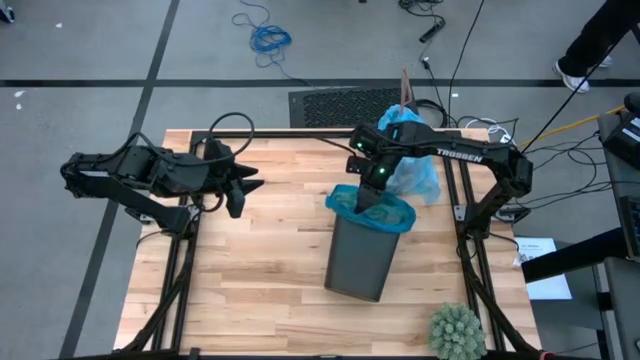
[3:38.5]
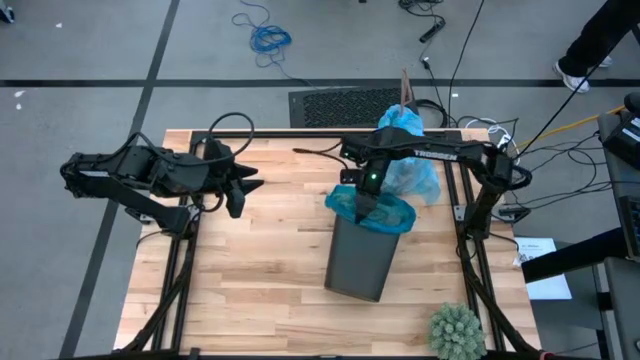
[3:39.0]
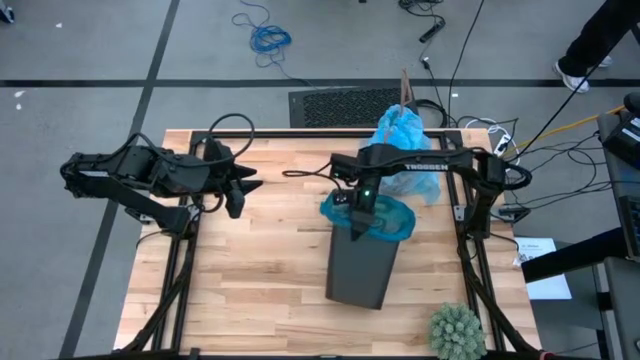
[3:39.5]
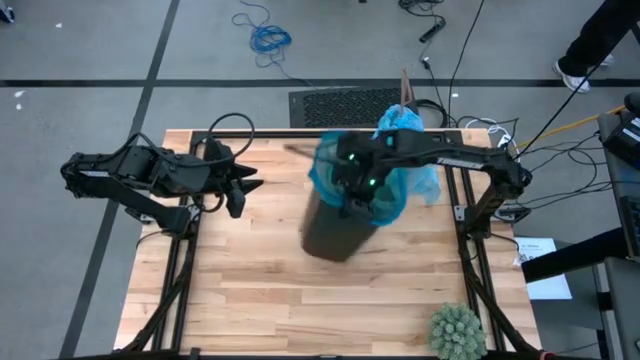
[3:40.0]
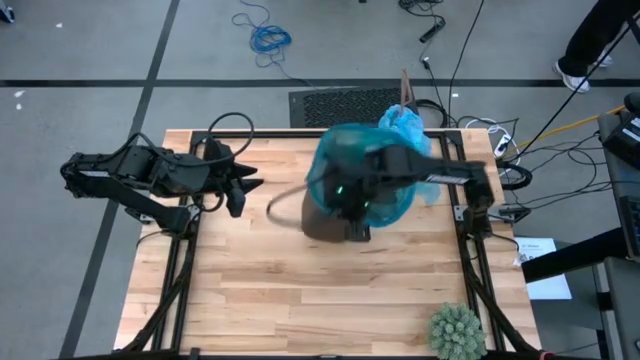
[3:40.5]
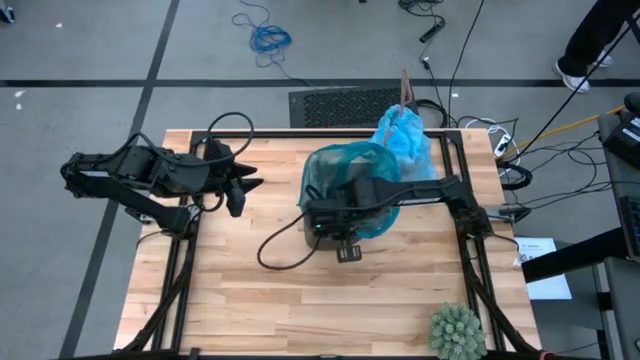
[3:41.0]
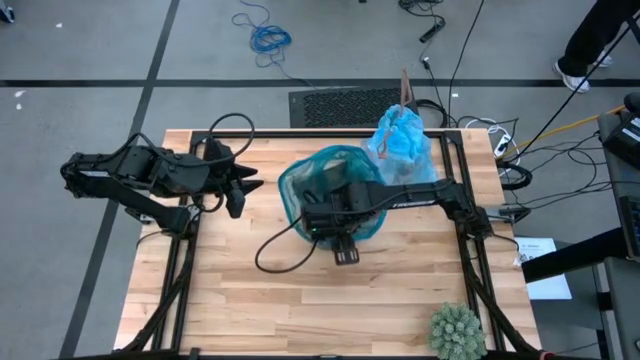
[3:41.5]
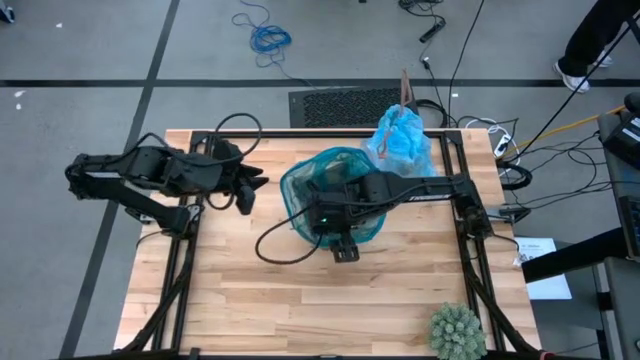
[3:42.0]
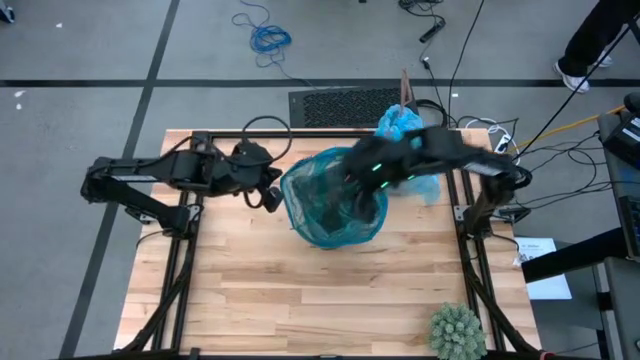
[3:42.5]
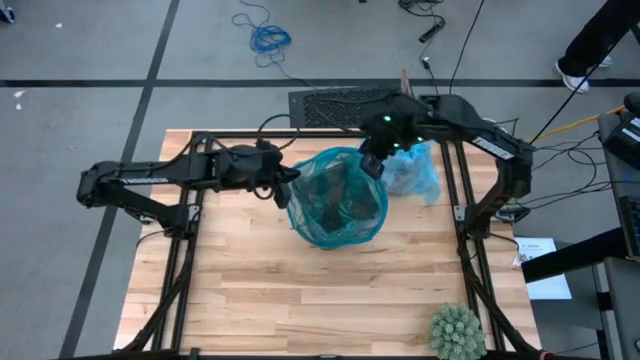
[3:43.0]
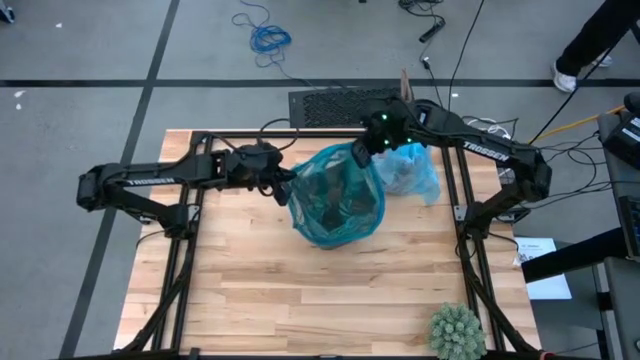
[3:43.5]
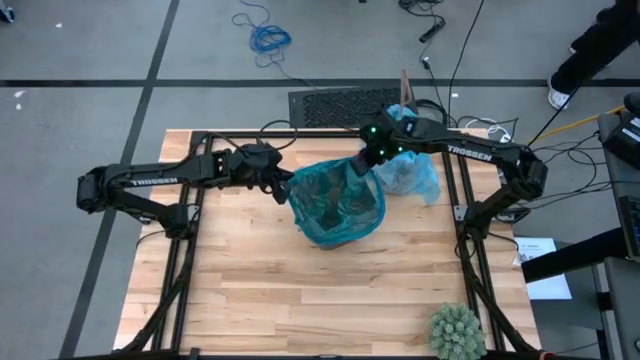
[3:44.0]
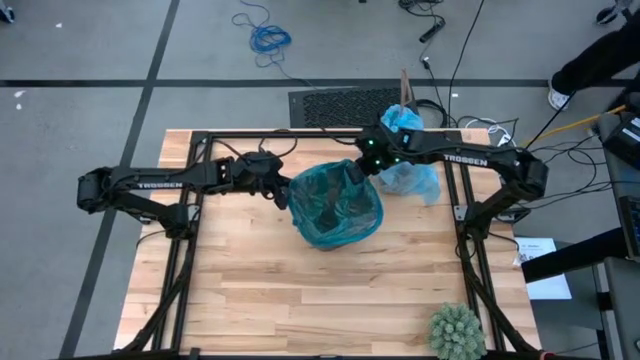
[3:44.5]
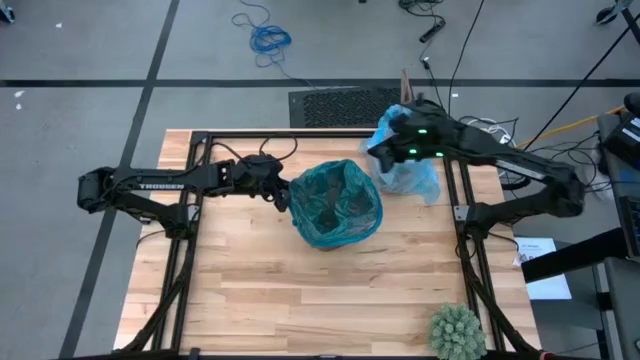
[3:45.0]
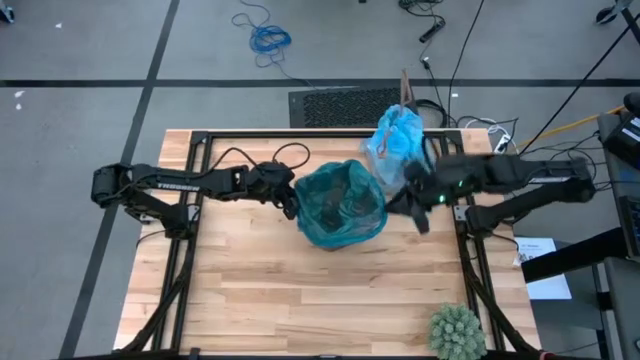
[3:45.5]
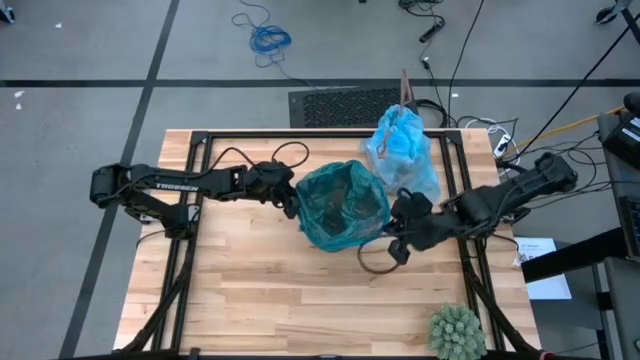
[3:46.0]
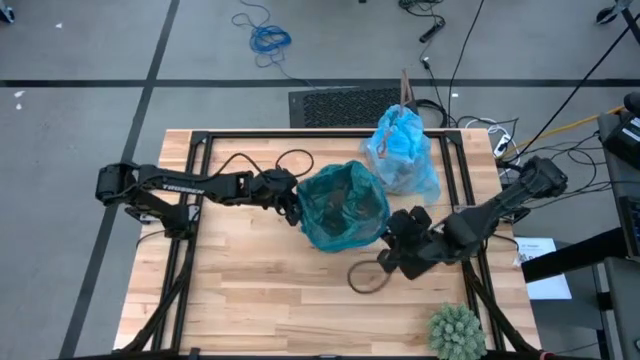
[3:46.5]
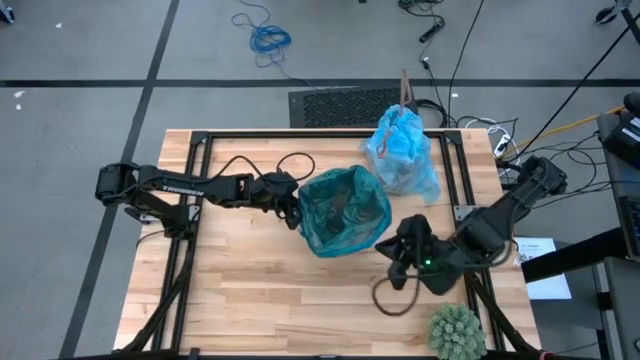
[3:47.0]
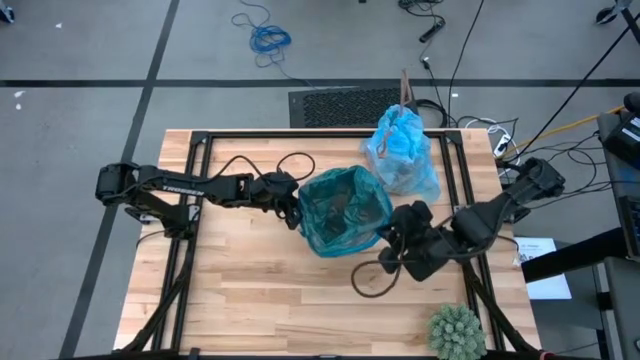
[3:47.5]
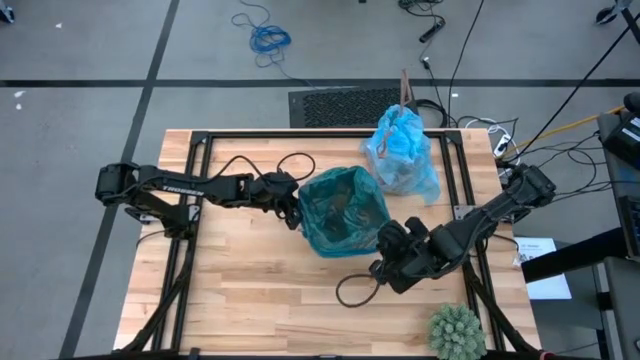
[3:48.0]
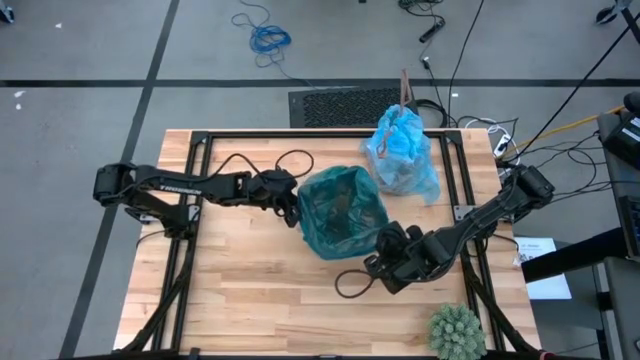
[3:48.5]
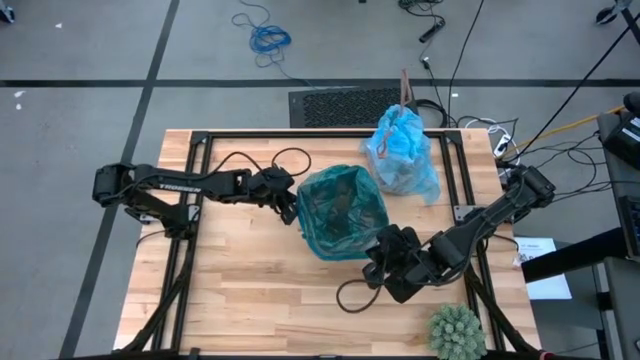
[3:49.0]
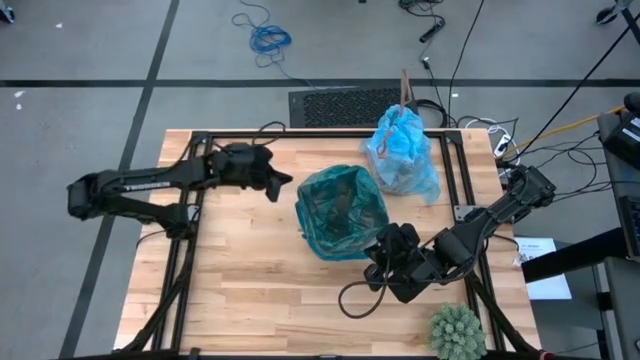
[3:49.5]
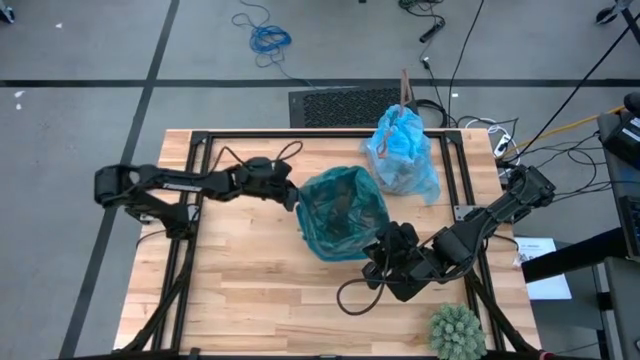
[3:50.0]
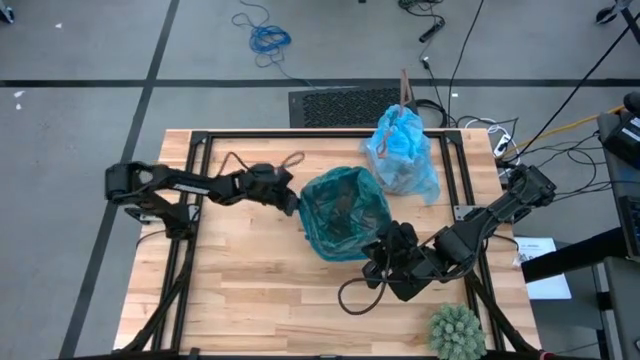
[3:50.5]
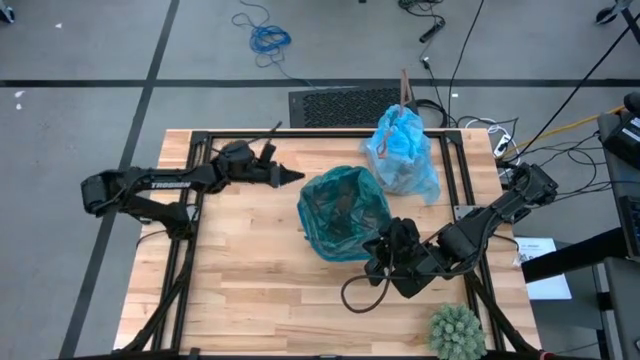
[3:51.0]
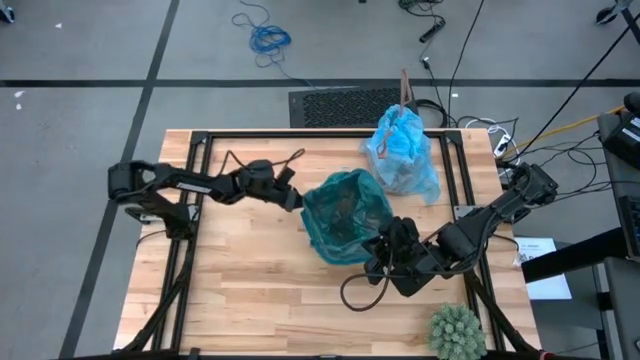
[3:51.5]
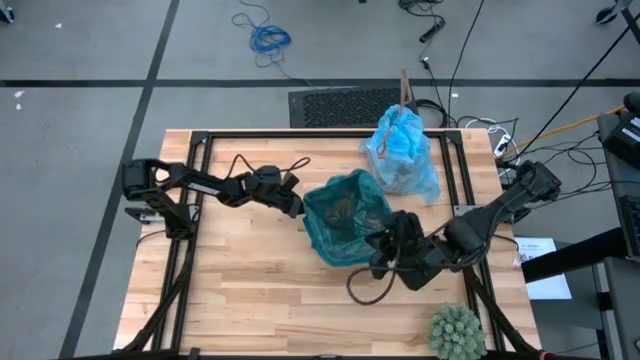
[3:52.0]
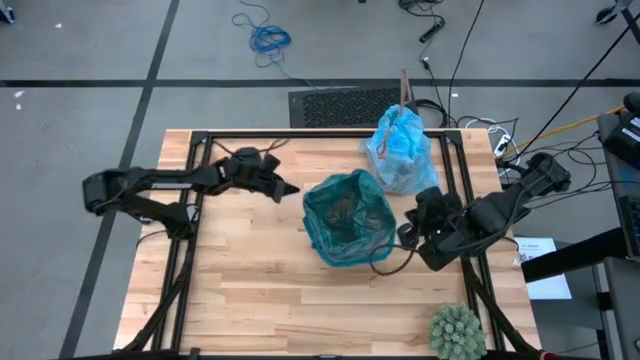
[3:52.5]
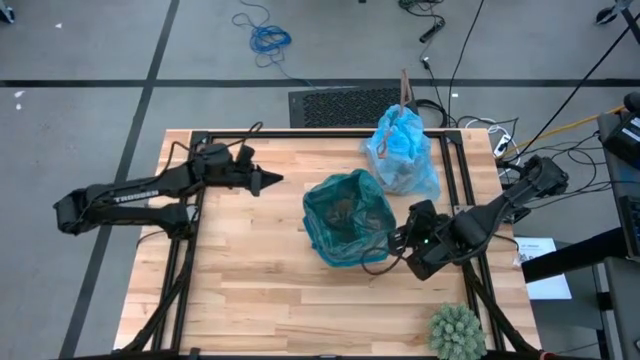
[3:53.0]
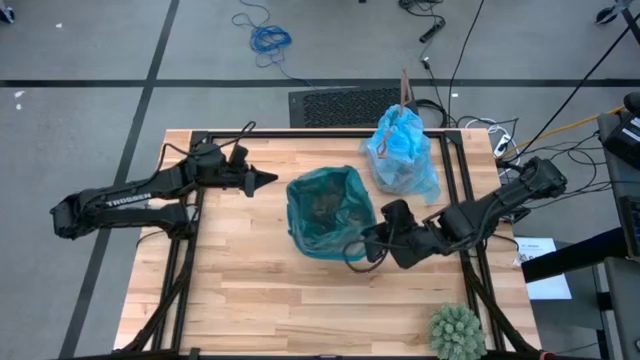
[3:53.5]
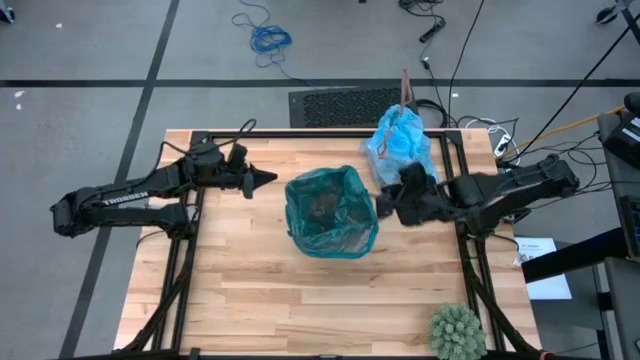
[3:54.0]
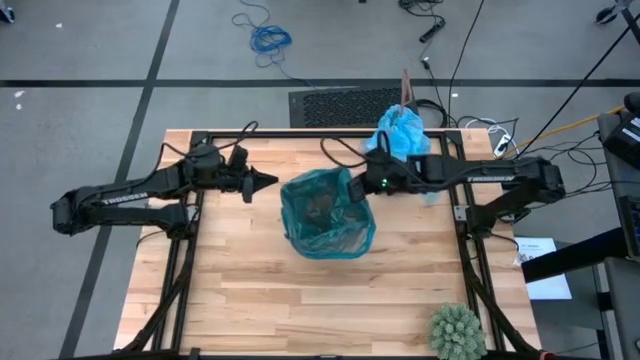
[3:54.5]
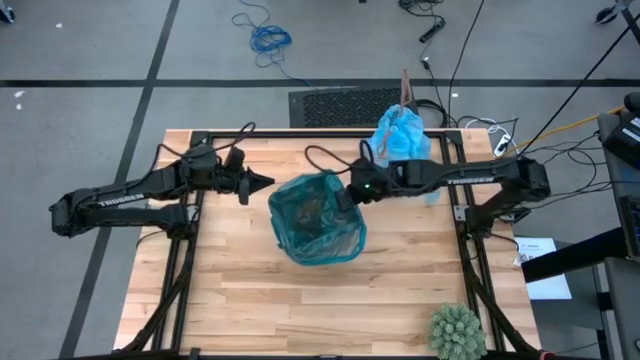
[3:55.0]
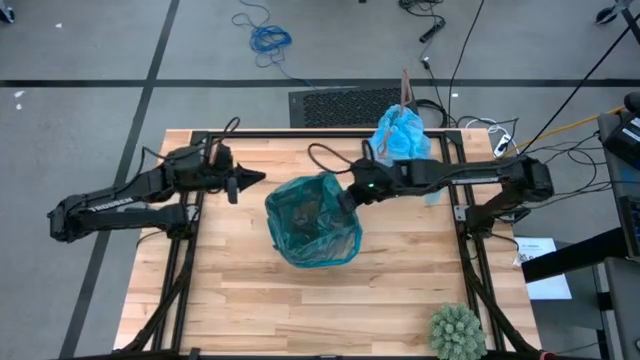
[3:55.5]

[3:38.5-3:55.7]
Task: place trash/remove bag and relplace
Insert the dark blue trash bag into the trash bin

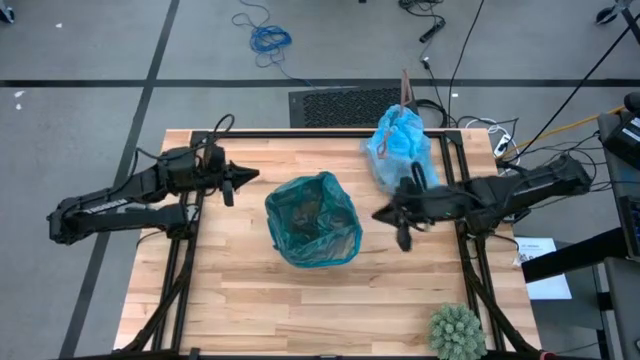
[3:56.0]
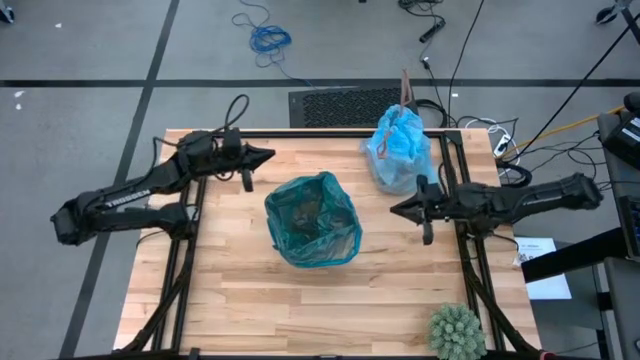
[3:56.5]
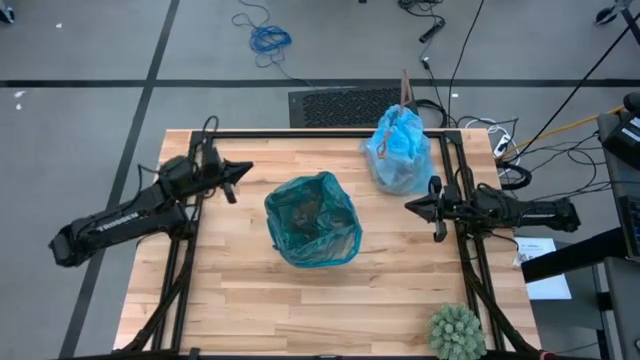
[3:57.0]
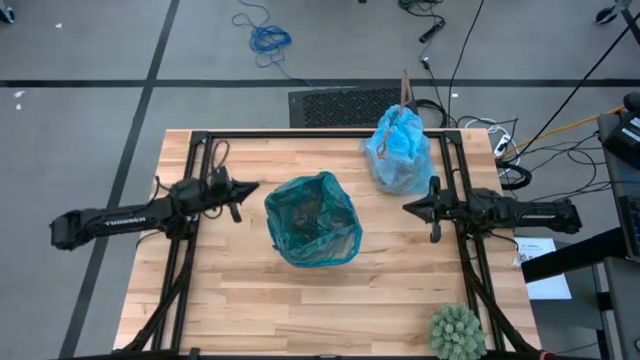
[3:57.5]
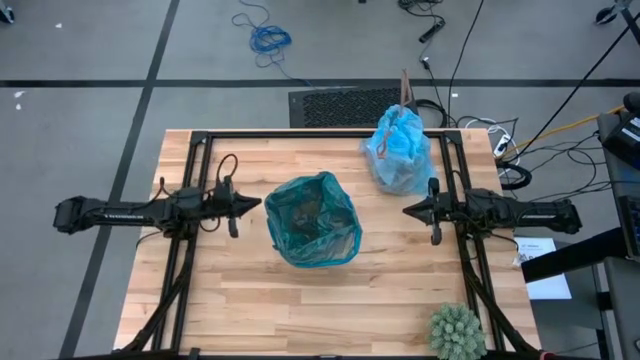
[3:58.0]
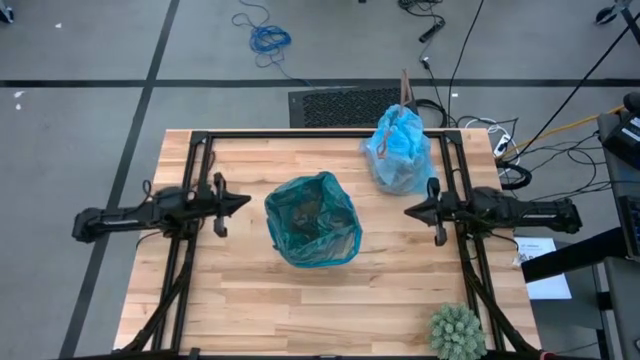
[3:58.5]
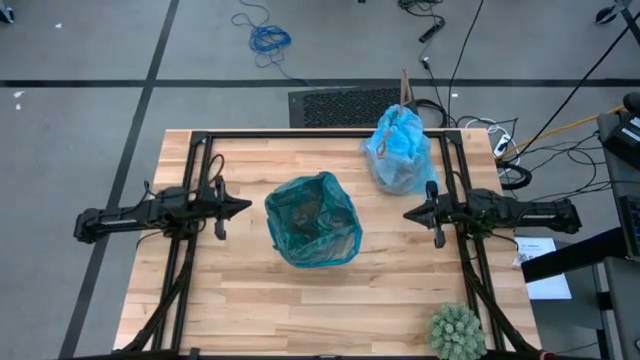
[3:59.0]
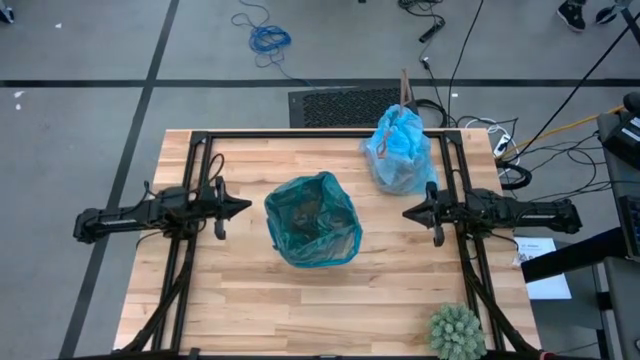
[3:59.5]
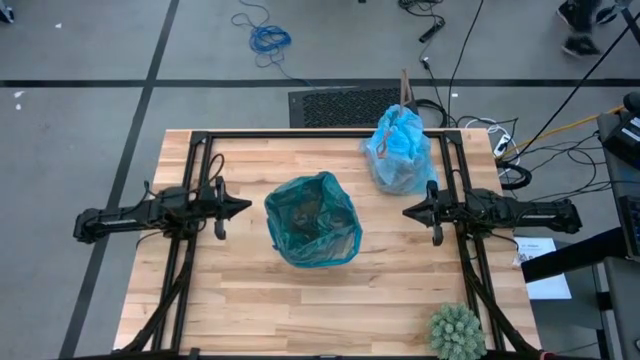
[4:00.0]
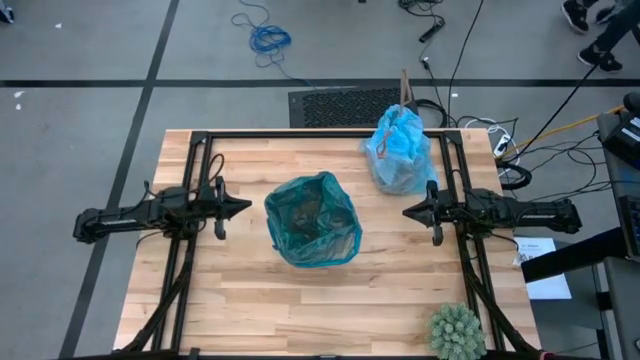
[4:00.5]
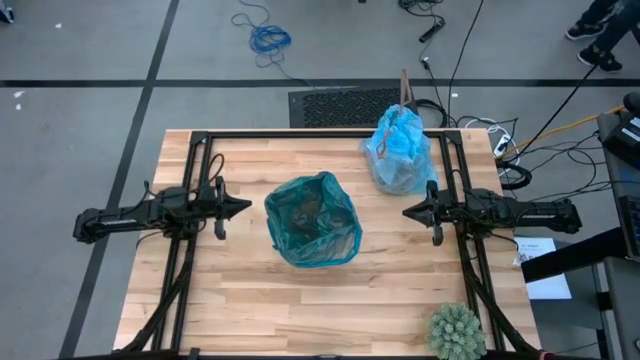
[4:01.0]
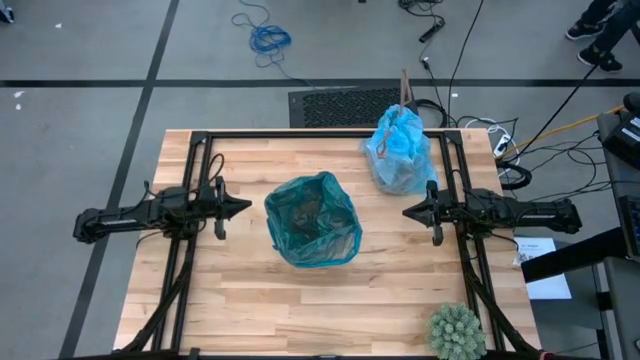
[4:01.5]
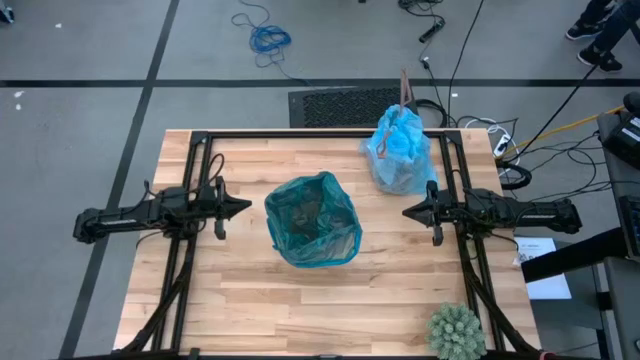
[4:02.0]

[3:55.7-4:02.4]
Return to Home Position
